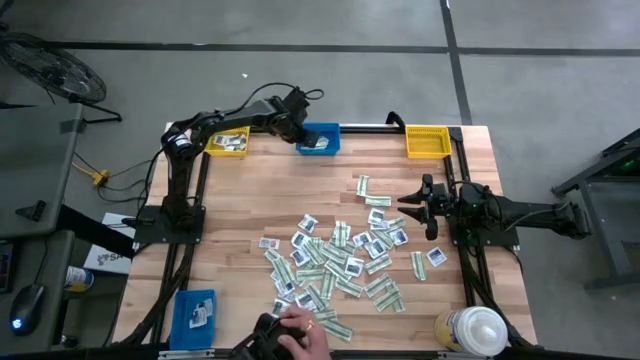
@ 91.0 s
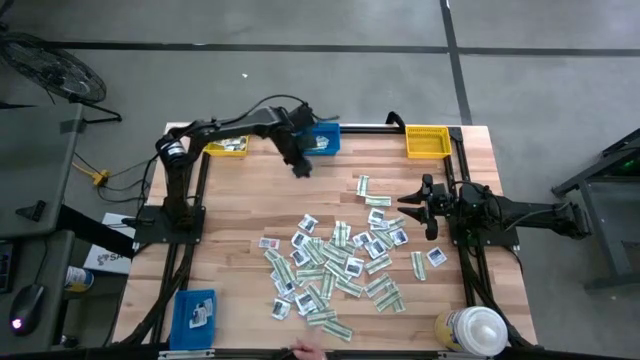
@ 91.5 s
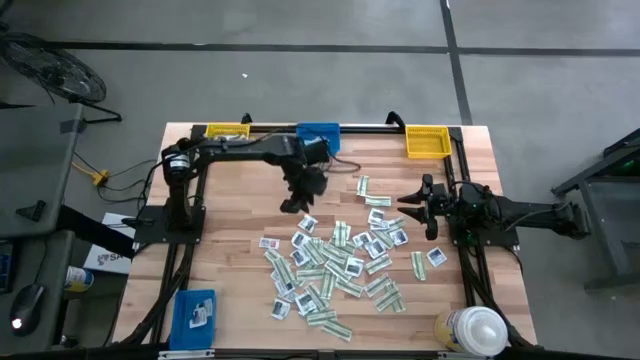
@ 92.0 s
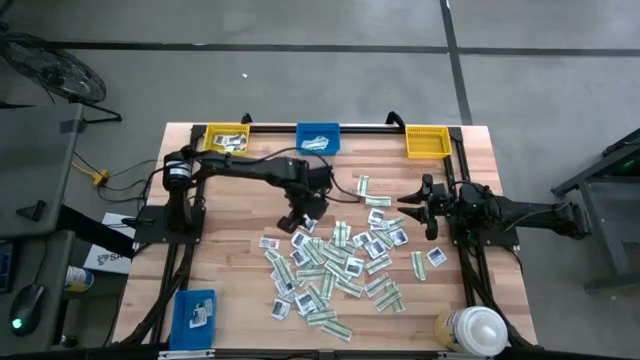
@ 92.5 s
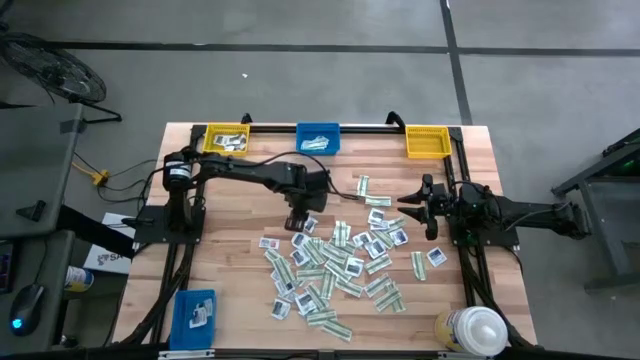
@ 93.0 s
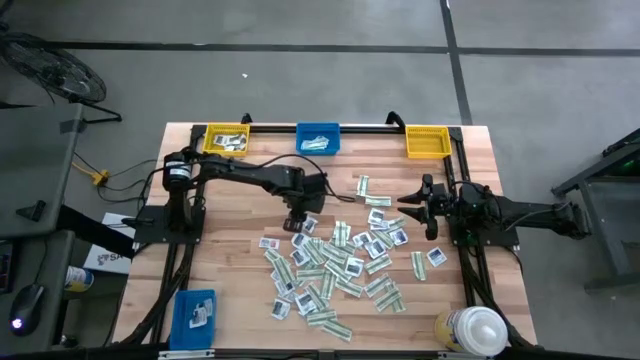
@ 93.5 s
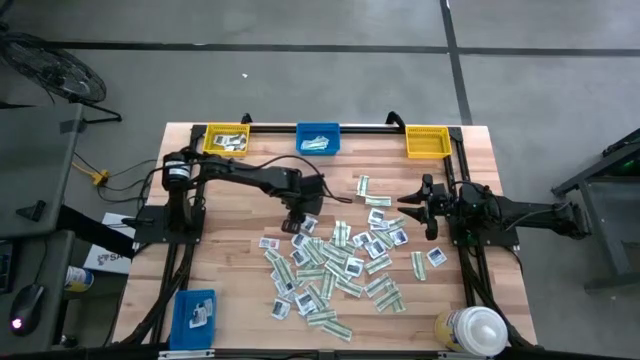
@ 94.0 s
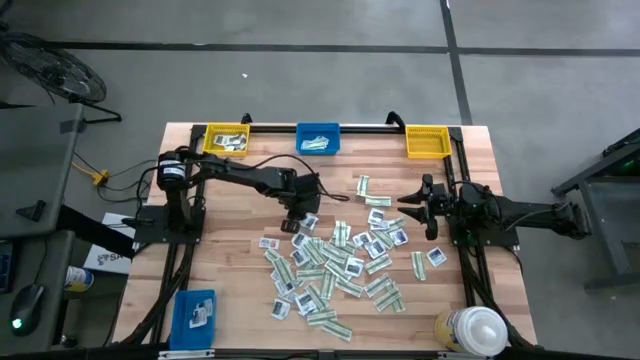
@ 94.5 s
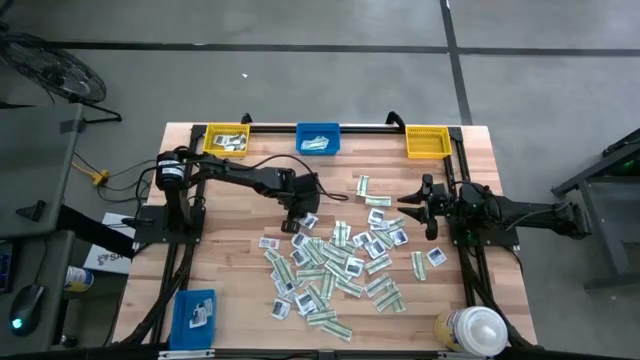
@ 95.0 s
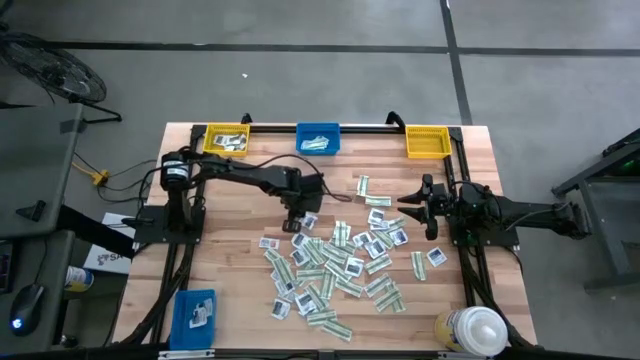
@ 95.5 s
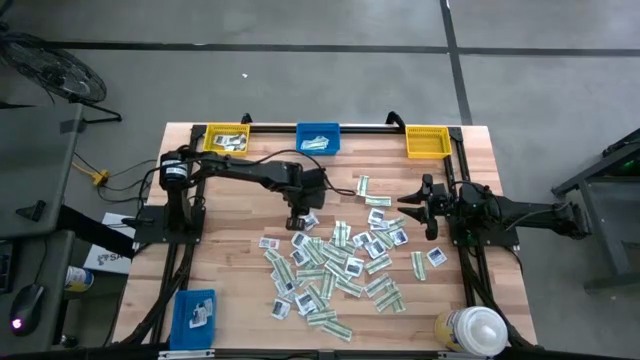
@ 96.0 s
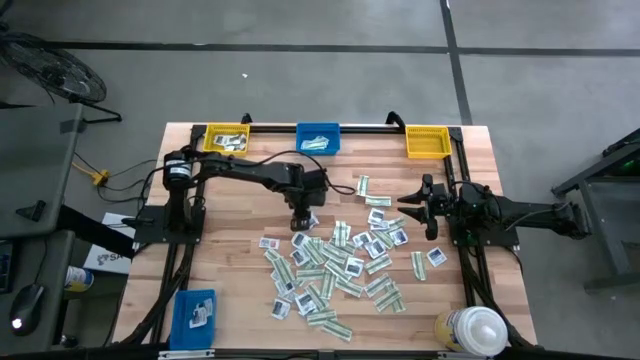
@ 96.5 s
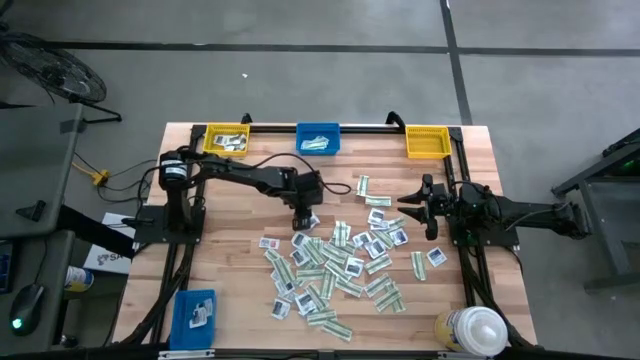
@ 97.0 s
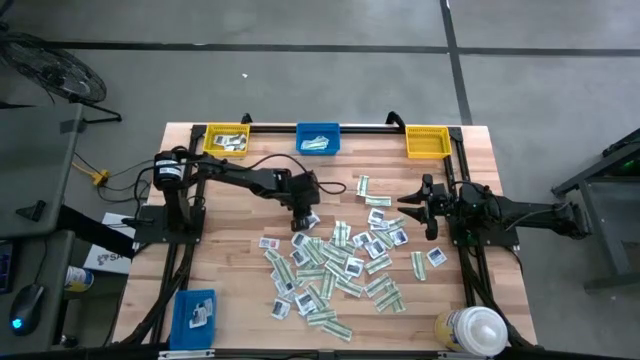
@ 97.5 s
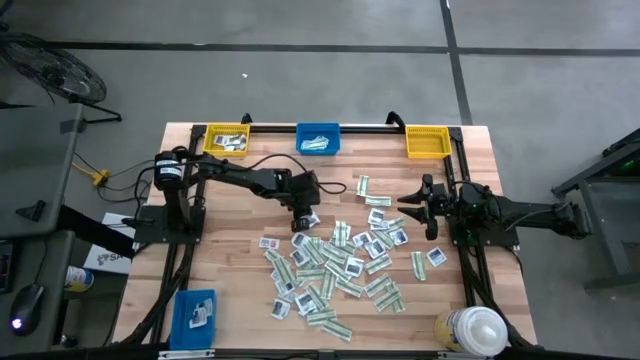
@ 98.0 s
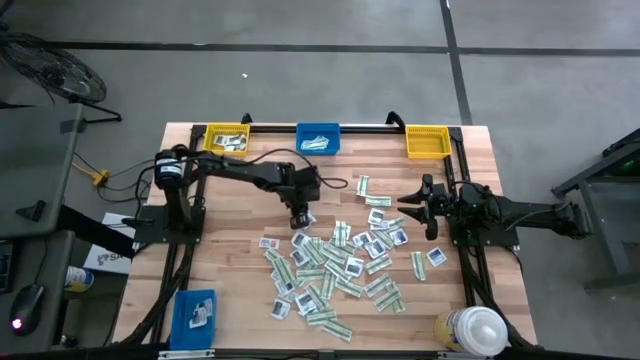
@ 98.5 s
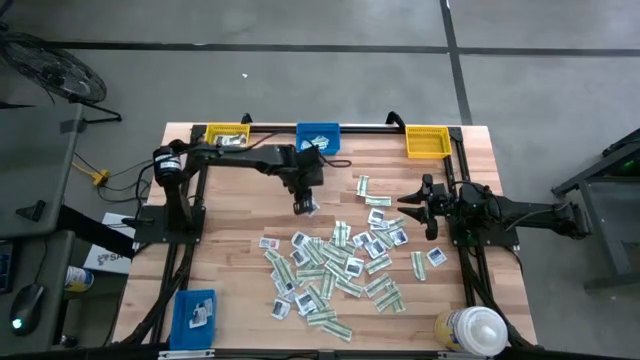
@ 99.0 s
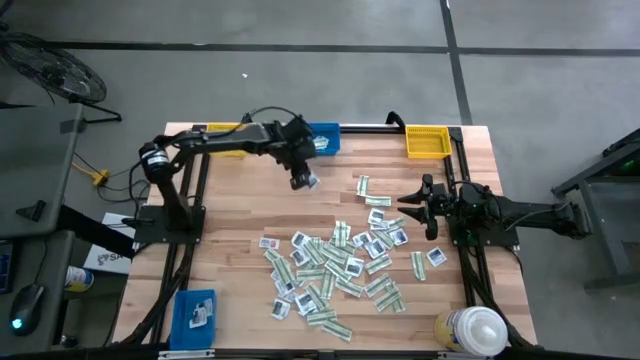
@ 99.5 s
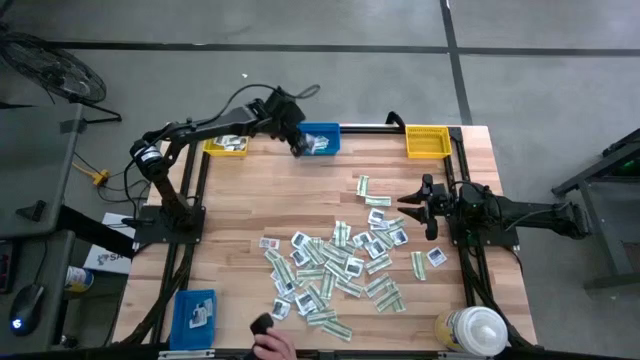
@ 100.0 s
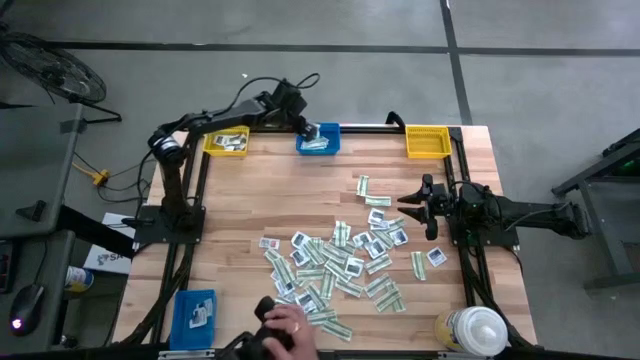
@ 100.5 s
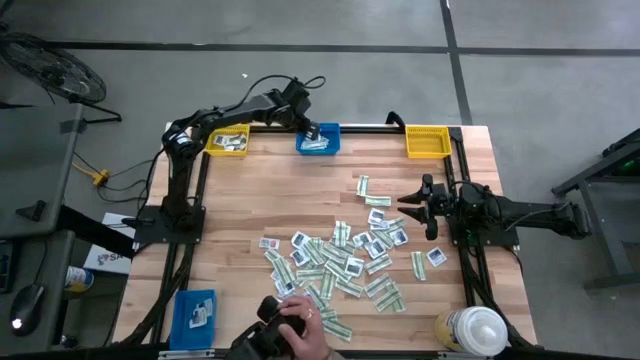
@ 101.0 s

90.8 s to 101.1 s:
Task: Pick & Place First Aid Supplies
Put the gray towelette pack into the left yellow bin

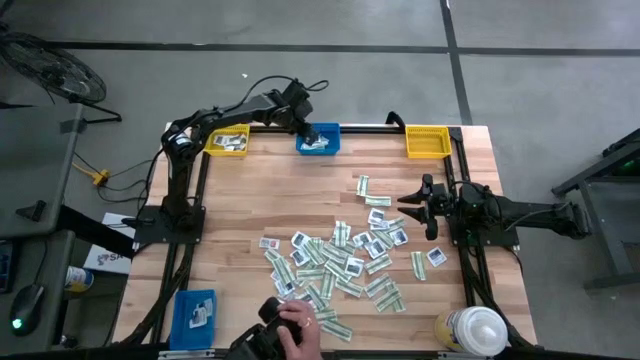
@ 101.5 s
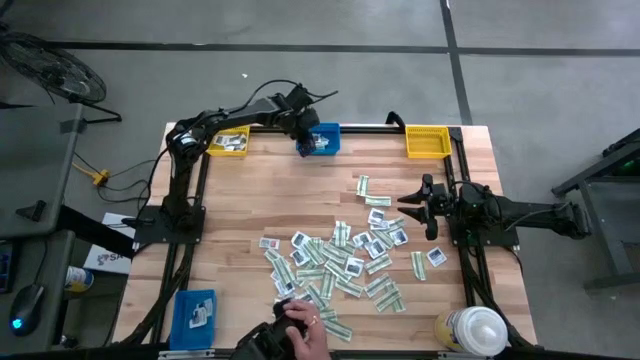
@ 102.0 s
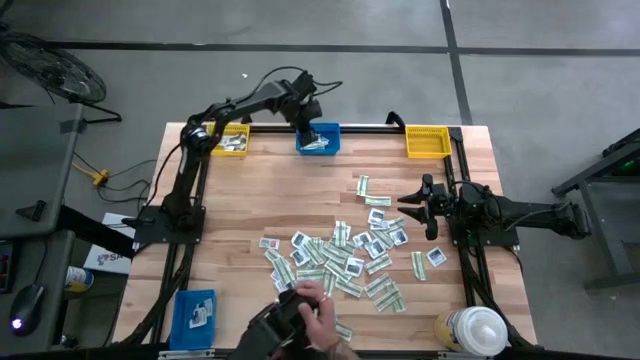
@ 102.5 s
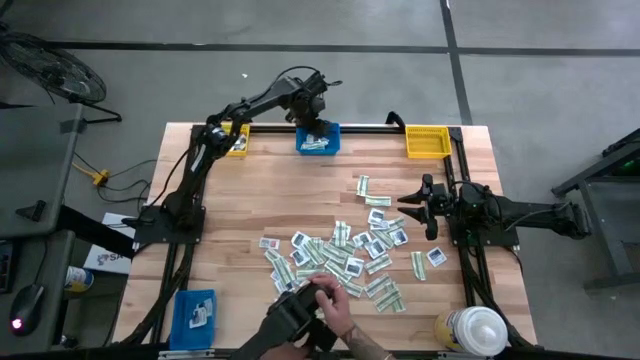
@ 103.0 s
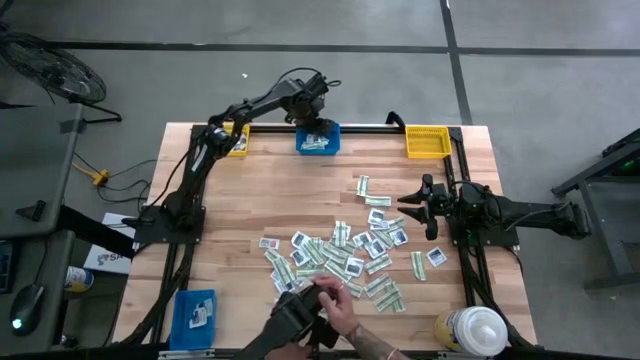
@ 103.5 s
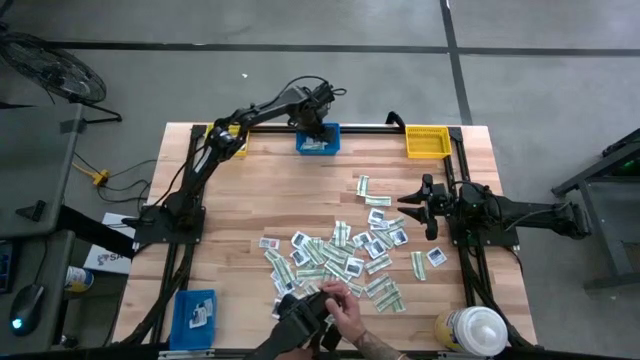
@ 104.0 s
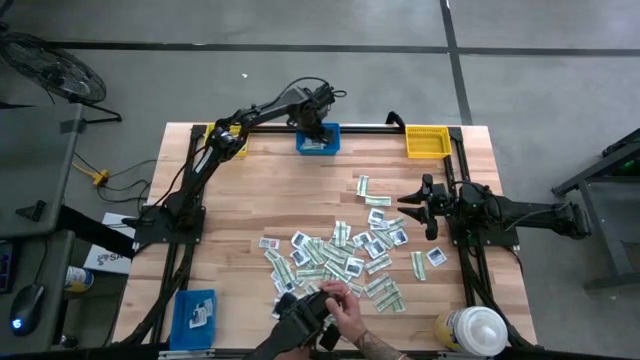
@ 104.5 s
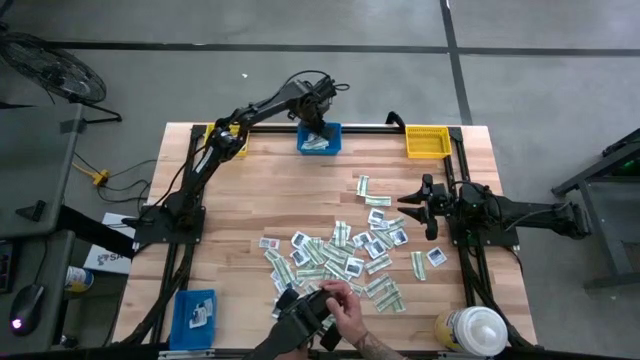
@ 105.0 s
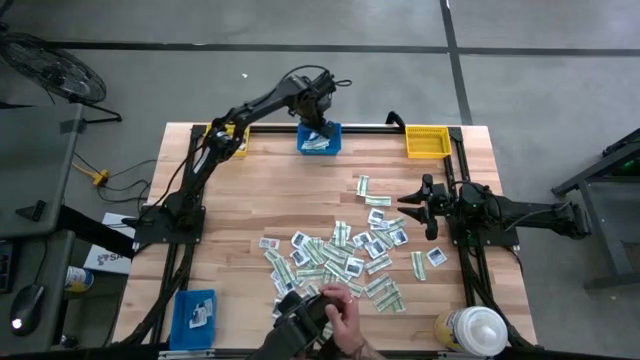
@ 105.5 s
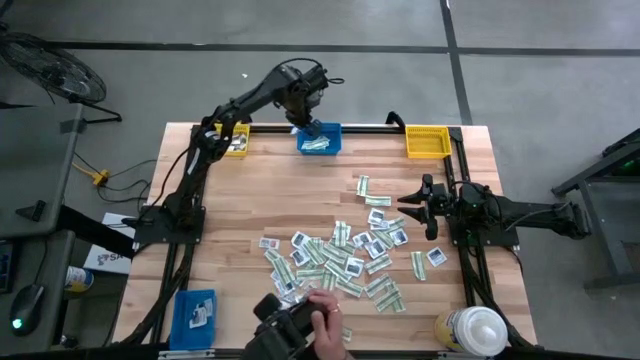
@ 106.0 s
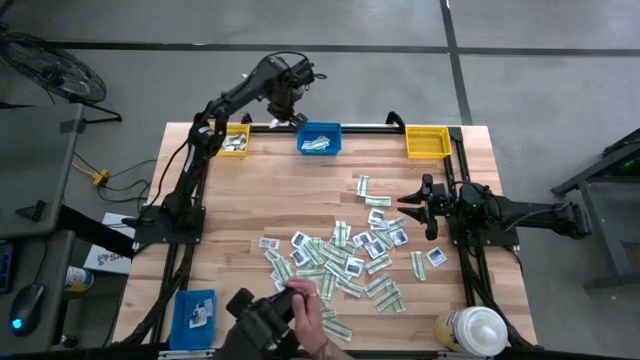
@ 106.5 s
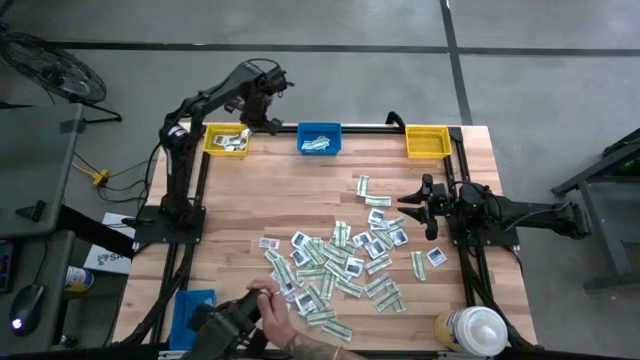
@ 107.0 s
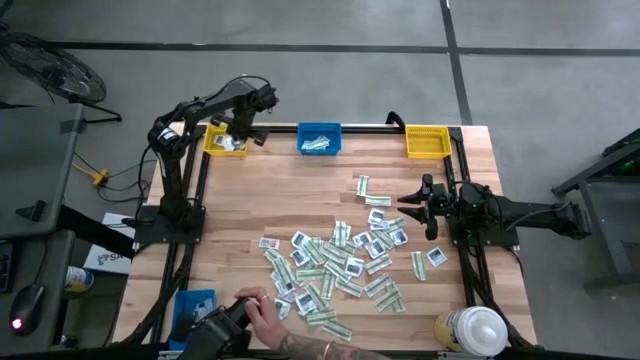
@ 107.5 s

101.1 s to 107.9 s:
Put the gray towelette pack into the left yellow bin

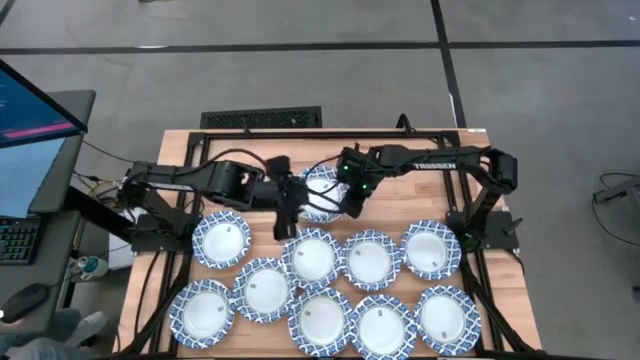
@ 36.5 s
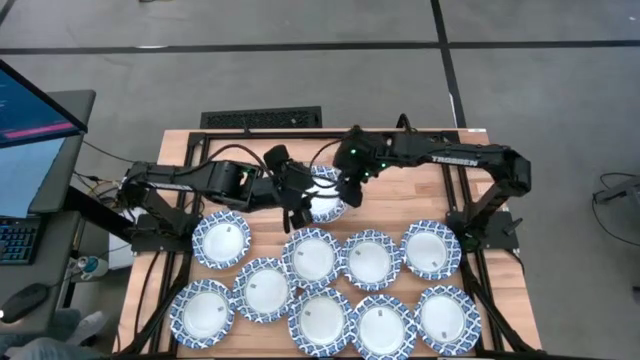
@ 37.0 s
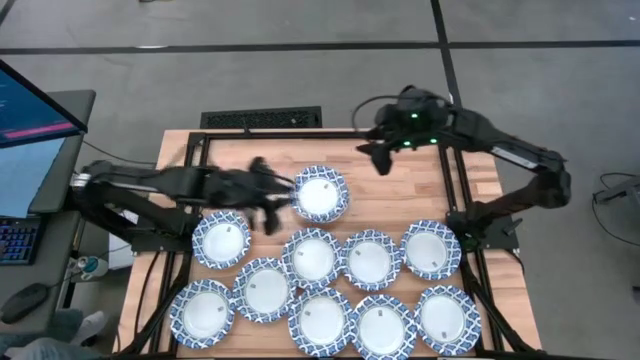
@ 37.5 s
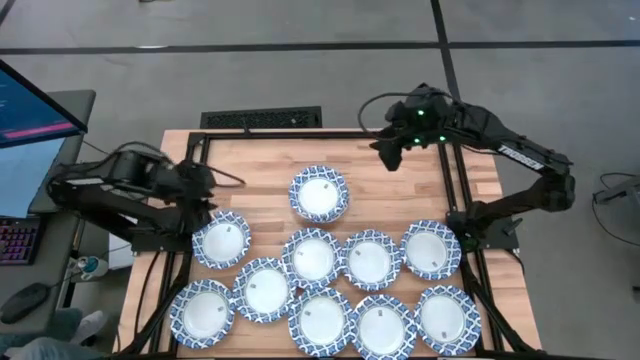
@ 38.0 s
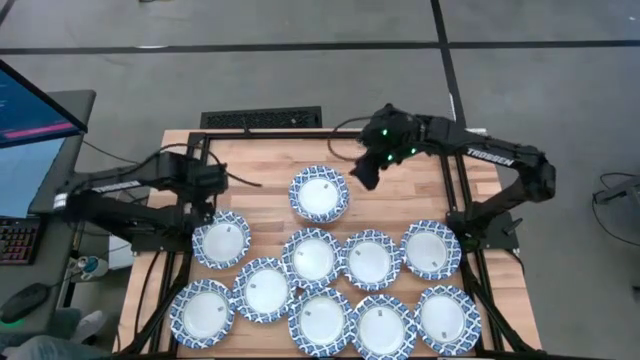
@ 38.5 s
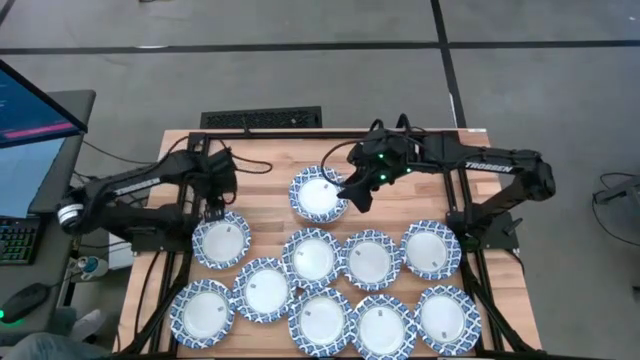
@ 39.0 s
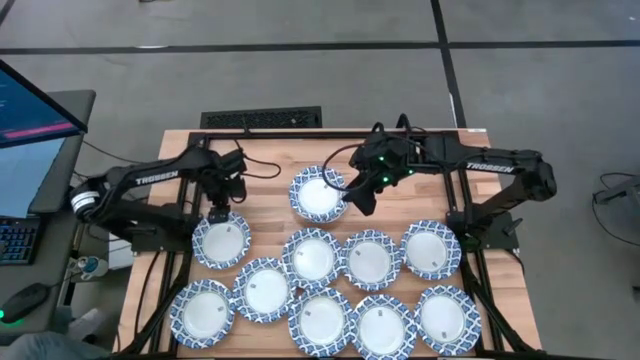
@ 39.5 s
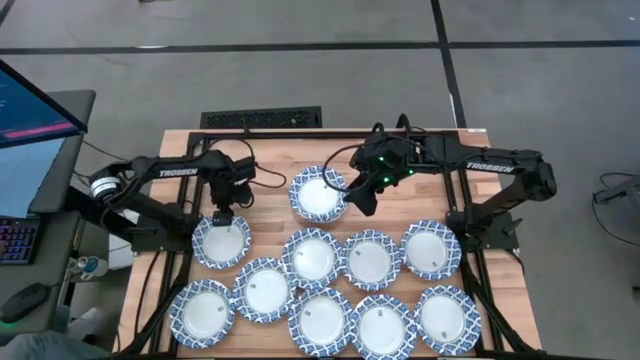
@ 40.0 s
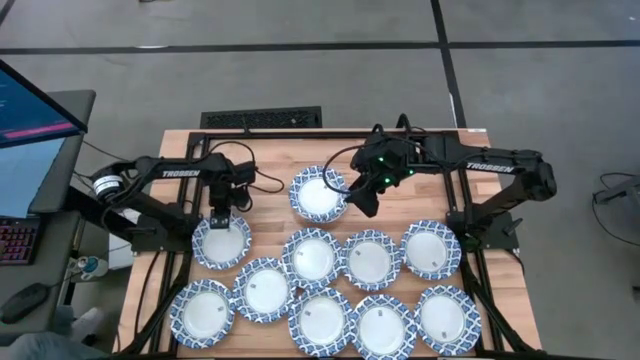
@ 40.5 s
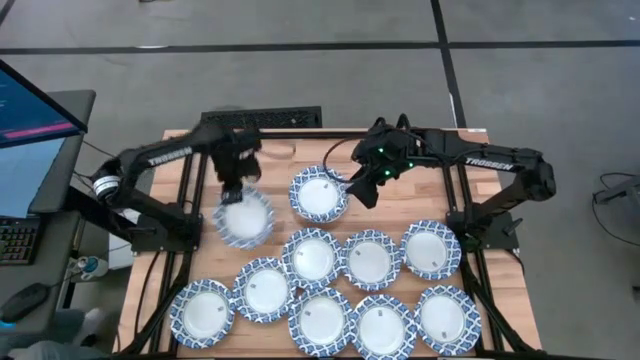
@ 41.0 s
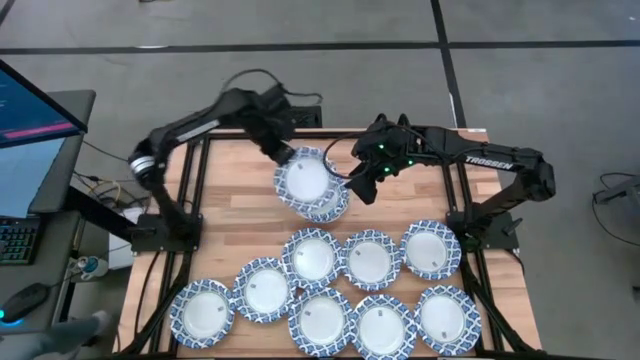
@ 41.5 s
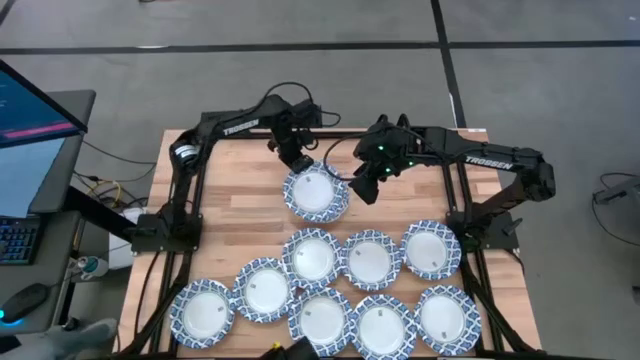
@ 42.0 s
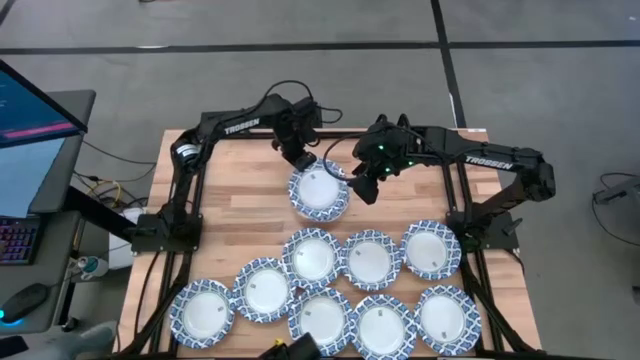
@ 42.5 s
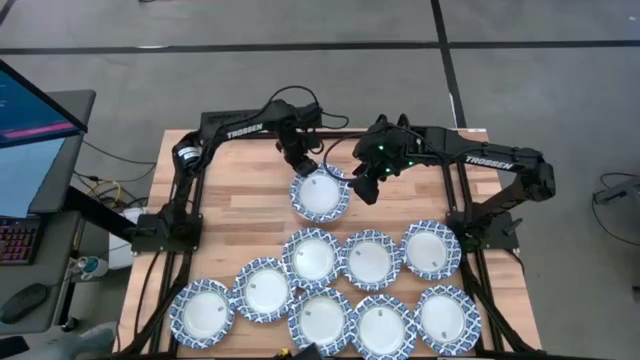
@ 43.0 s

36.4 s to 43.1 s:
Task: Nest bowls inside each other
Stack the white bowl on the stacked white bowls
